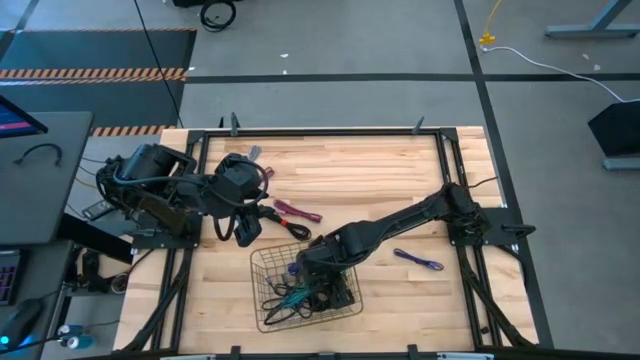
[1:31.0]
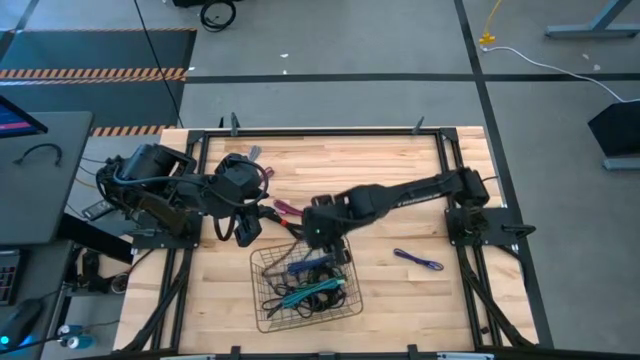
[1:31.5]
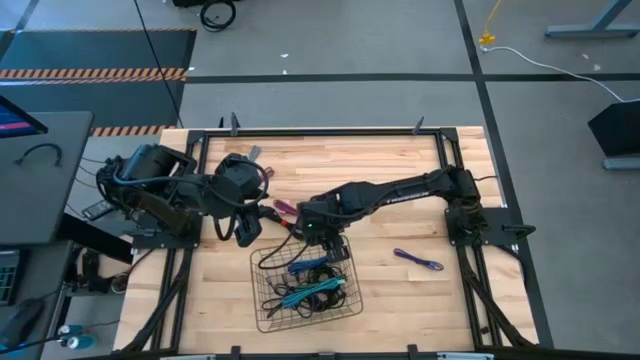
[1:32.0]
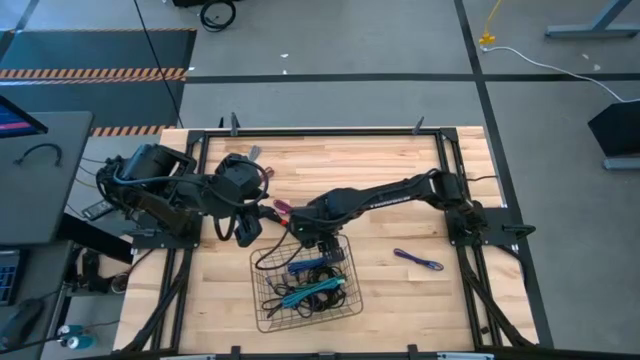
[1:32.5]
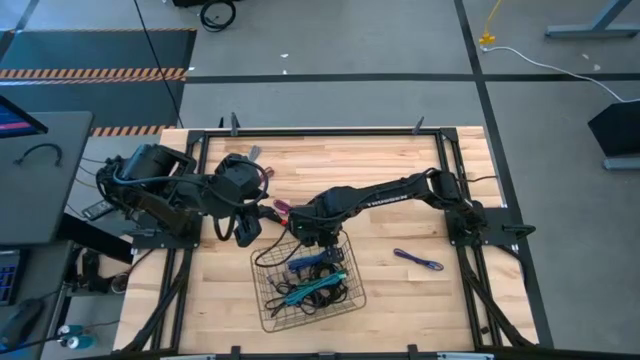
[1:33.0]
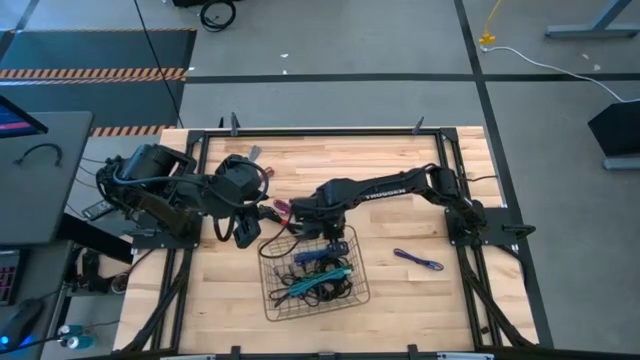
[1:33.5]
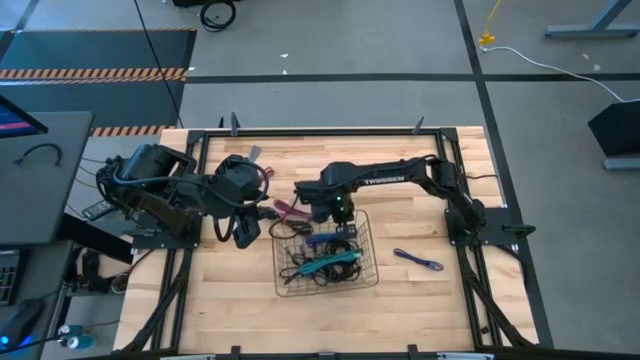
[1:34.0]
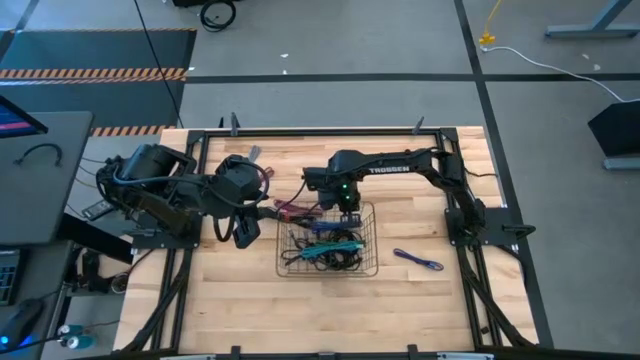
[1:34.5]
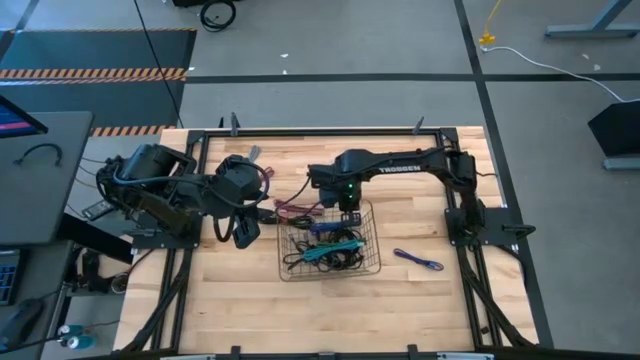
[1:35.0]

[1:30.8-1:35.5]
Task: Pick and place USB-C Cables
Move the wire basket to the center of the table

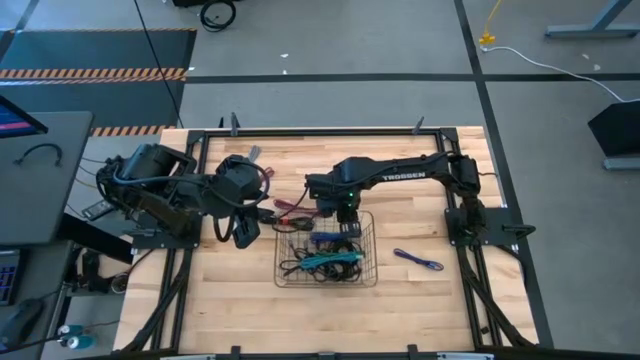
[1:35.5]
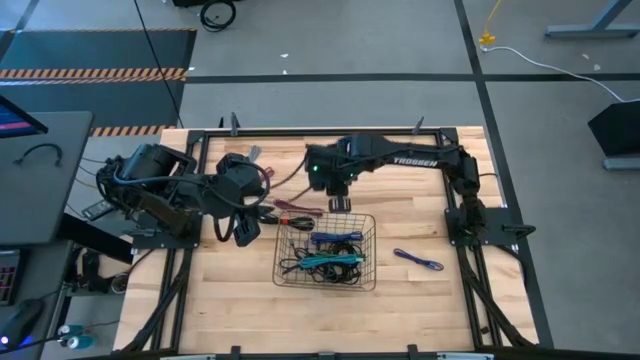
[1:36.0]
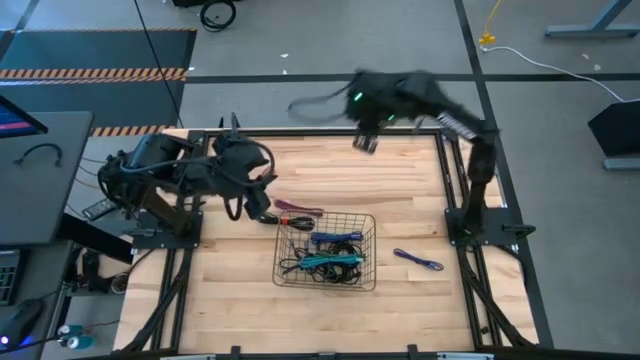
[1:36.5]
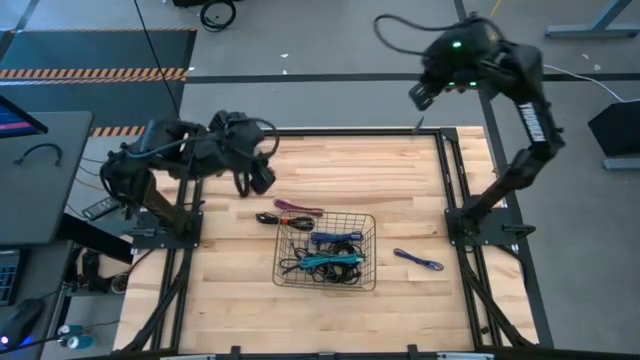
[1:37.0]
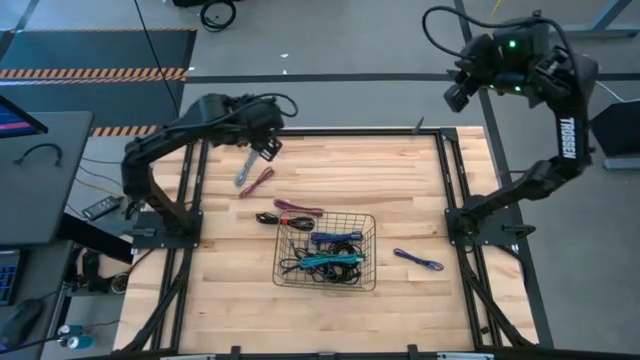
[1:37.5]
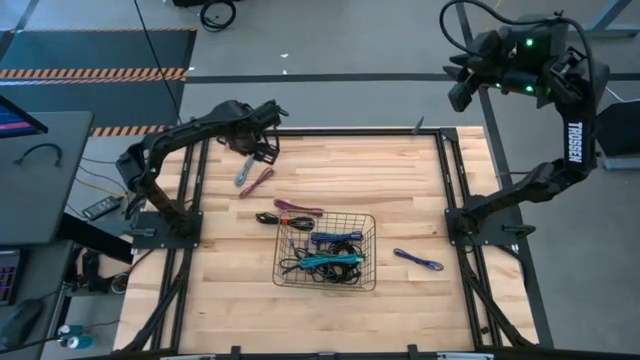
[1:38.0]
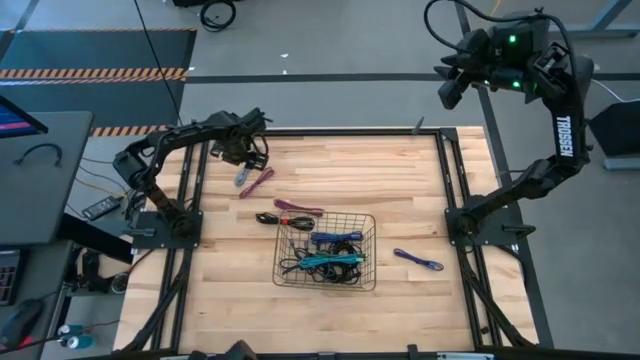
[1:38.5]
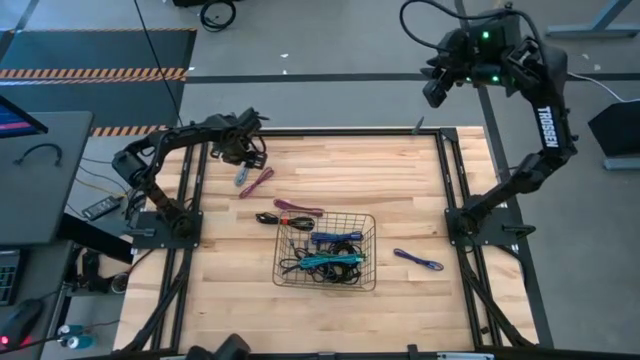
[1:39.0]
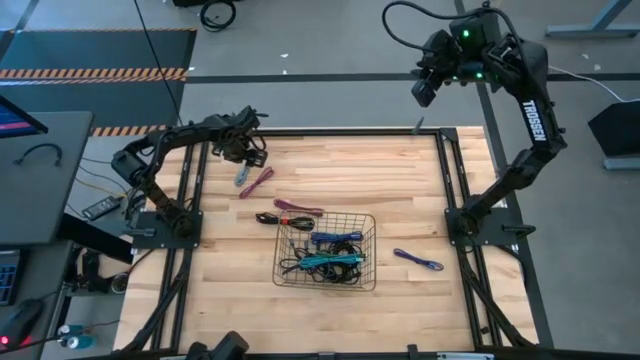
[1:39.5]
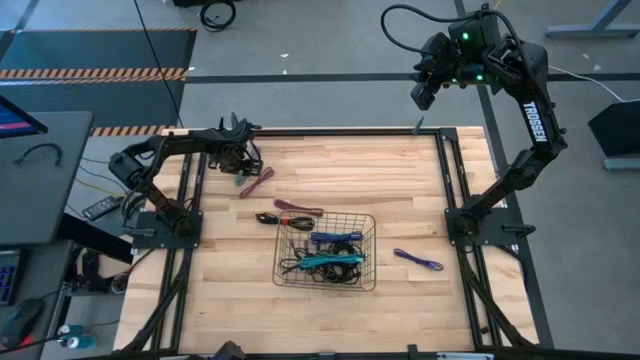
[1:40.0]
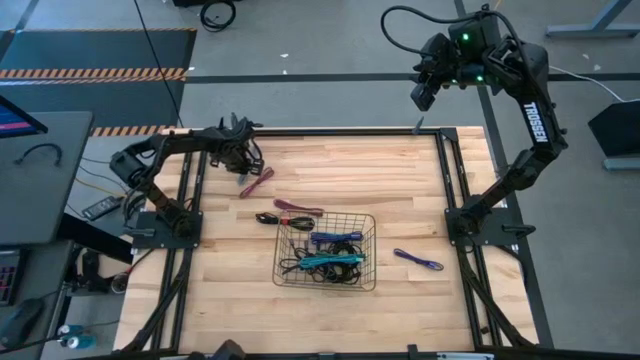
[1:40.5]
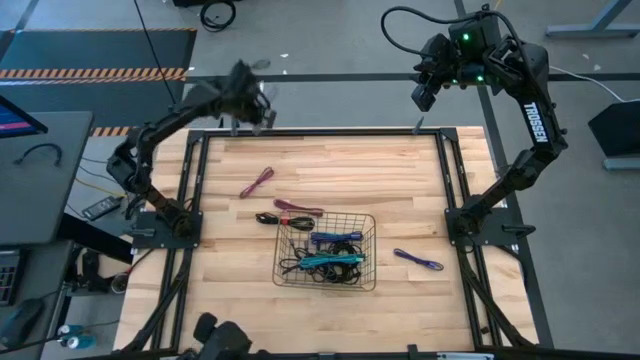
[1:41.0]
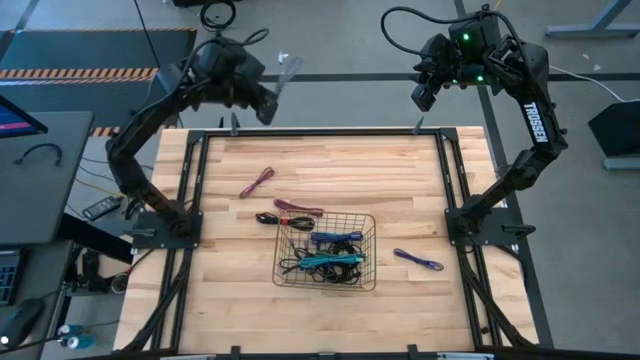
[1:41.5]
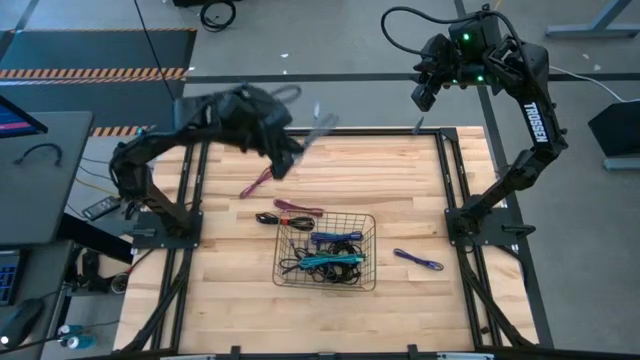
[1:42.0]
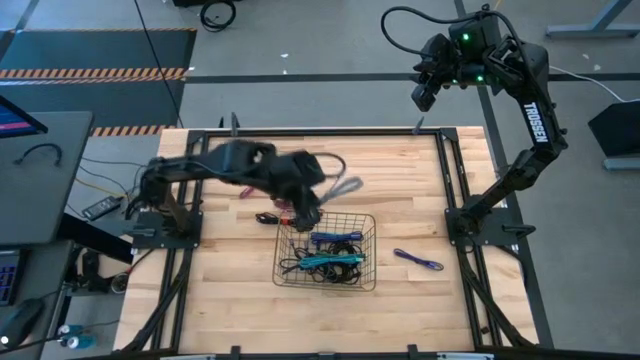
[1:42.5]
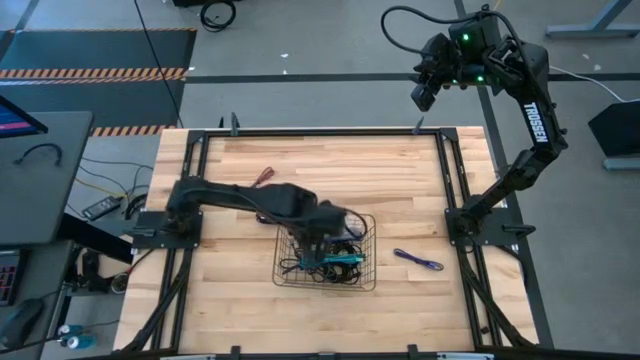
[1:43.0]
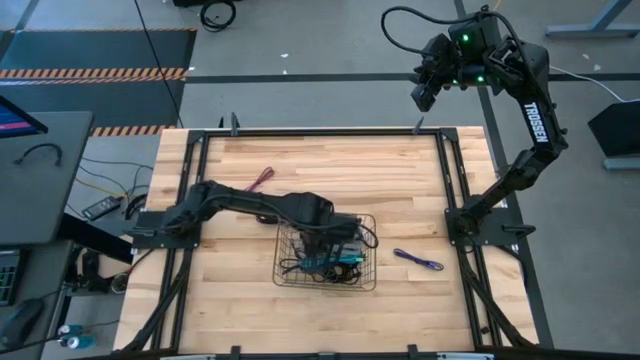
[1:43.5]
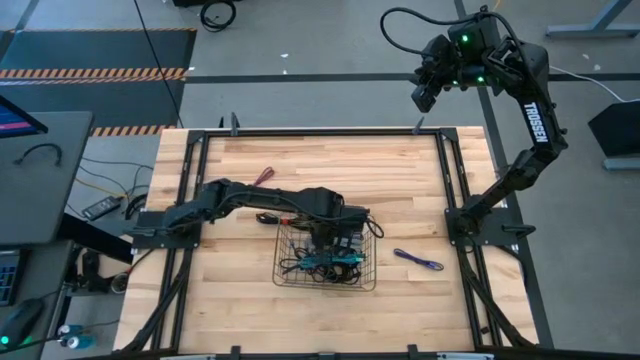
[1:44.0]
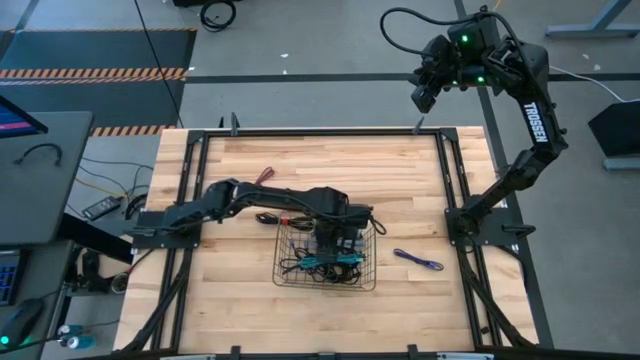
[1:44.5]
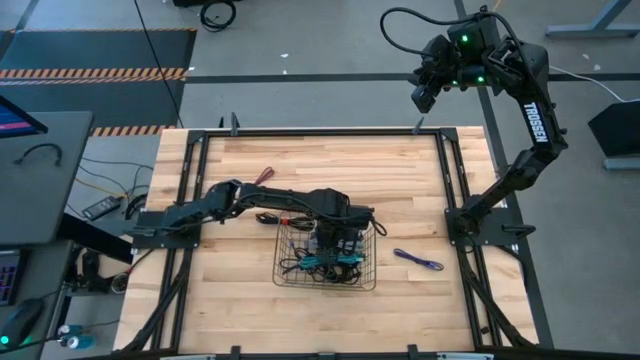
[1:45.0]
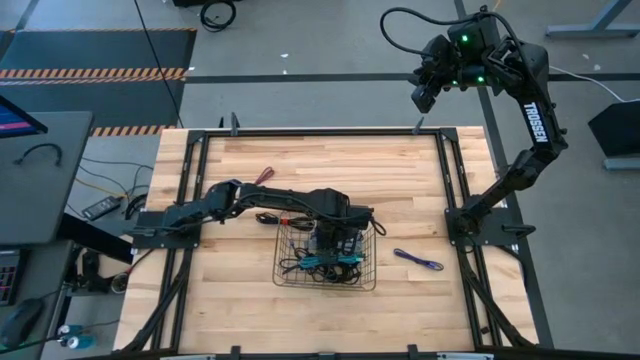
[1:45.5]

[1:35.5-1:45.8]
Put the white charger cable into the wire basket

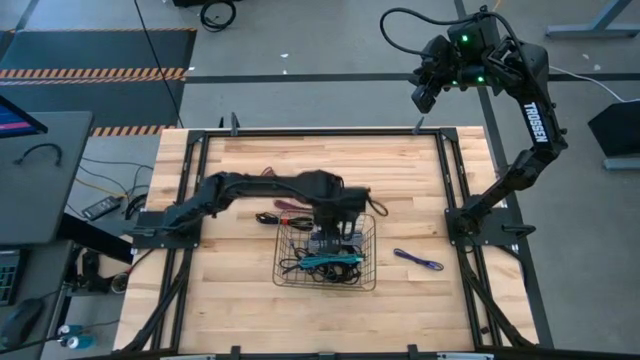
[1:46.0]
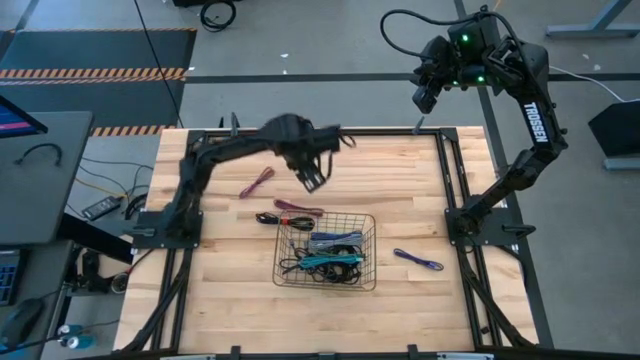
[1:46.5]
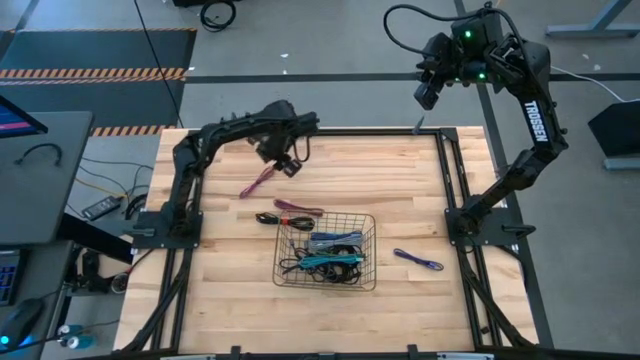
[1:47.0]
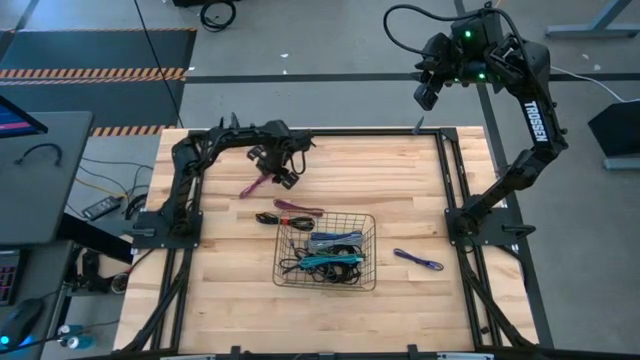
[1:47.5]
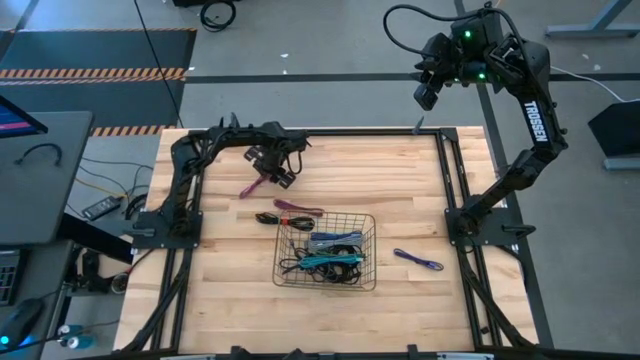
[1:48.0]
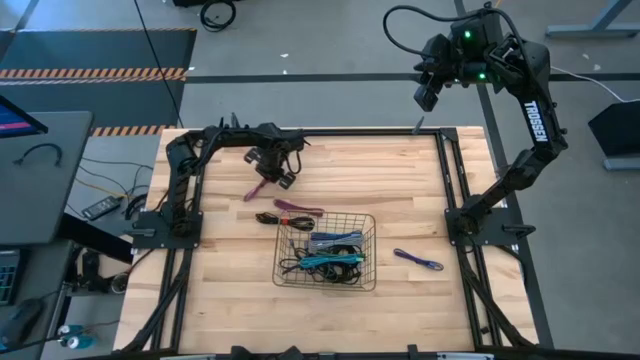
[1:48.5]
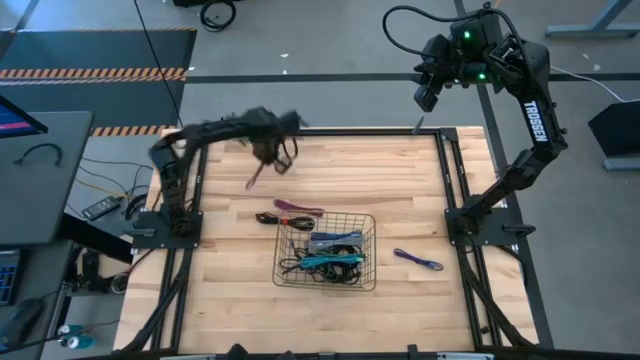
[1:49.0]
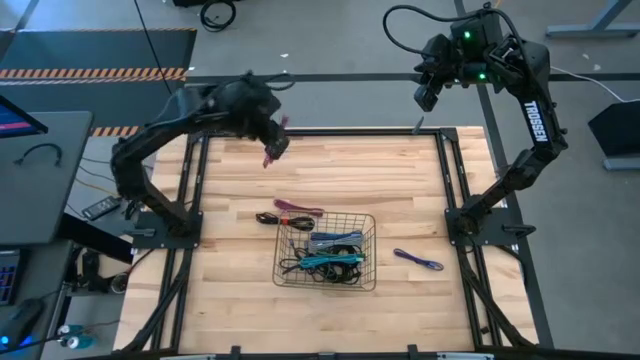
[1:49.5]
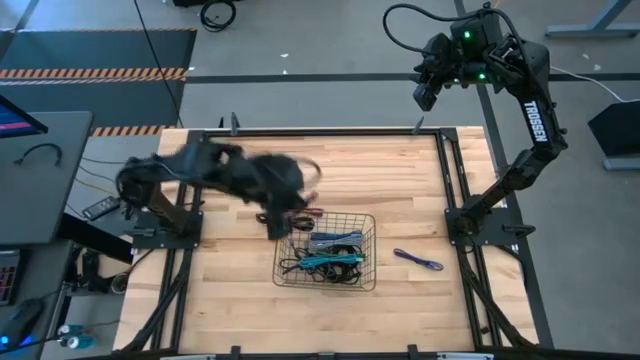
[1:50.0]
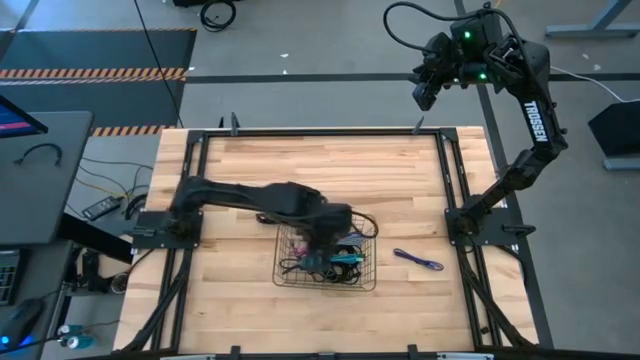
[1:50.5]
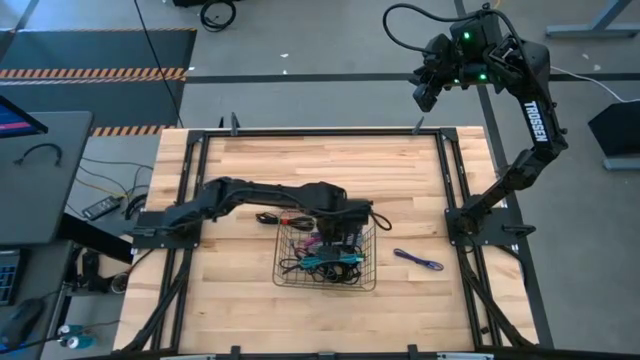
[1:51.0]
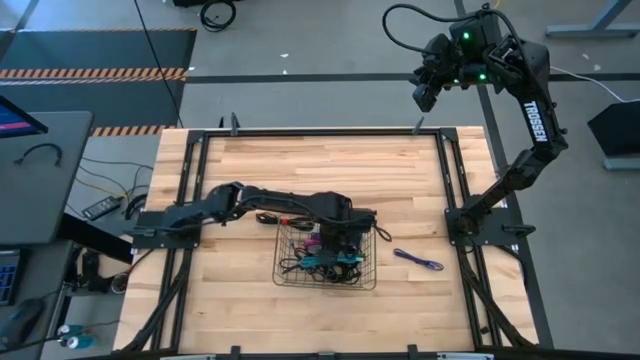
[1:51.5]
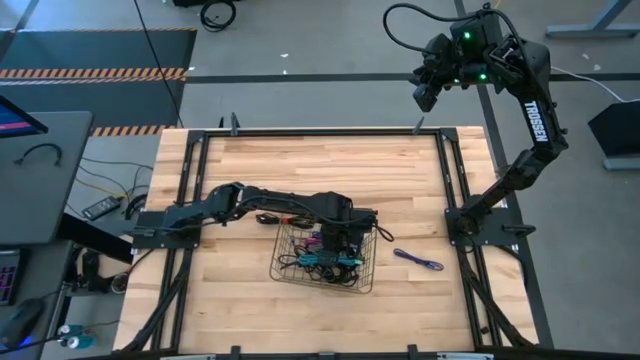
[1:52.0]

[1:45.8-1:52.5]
Put the pink charger cable into the wire basket
